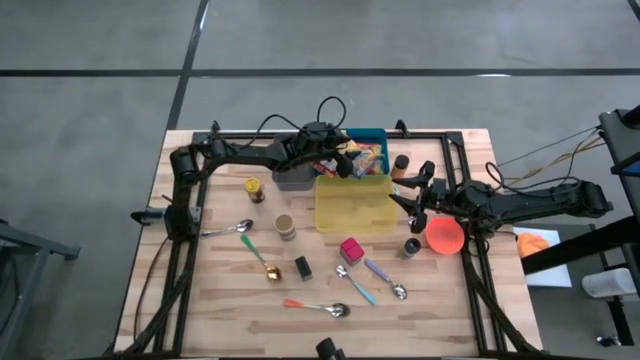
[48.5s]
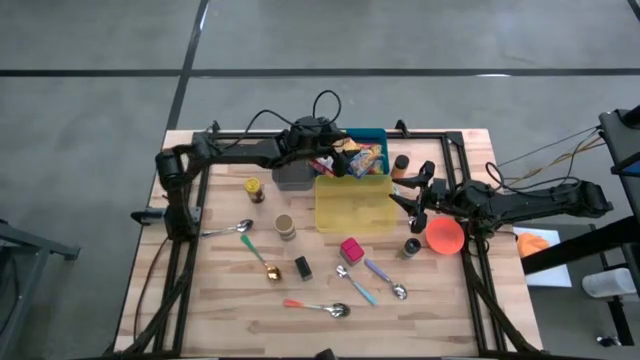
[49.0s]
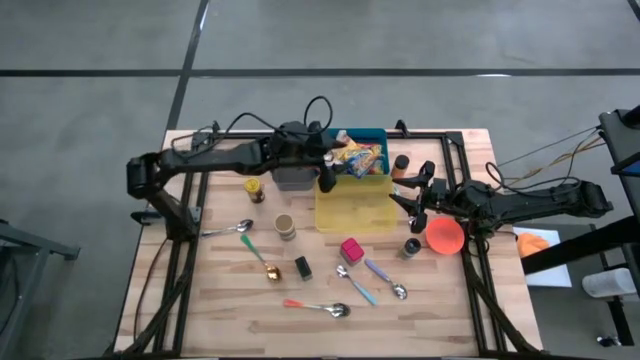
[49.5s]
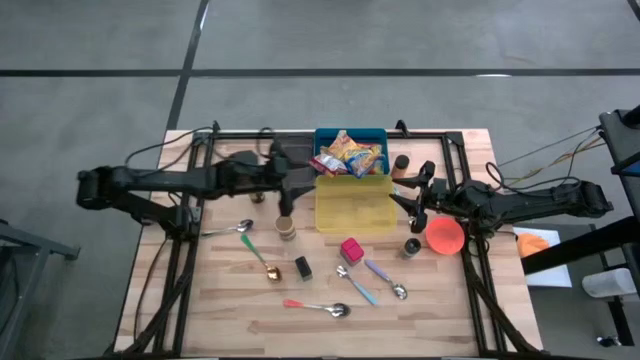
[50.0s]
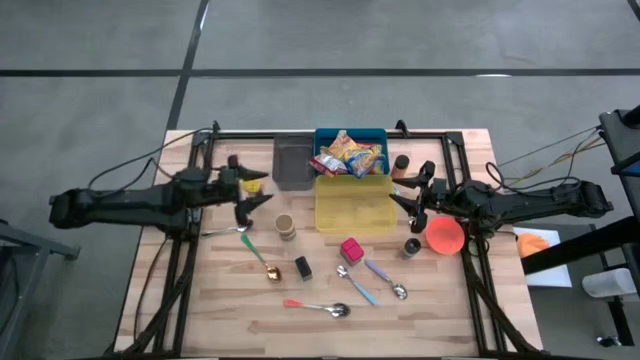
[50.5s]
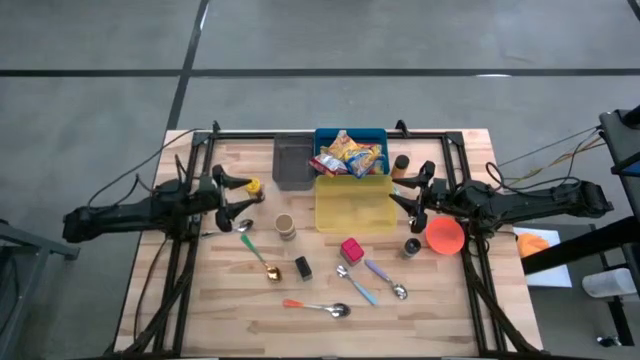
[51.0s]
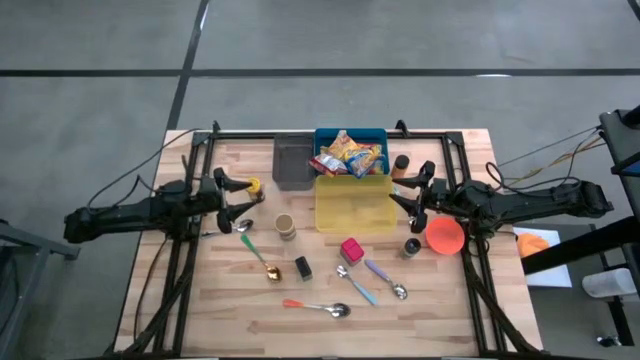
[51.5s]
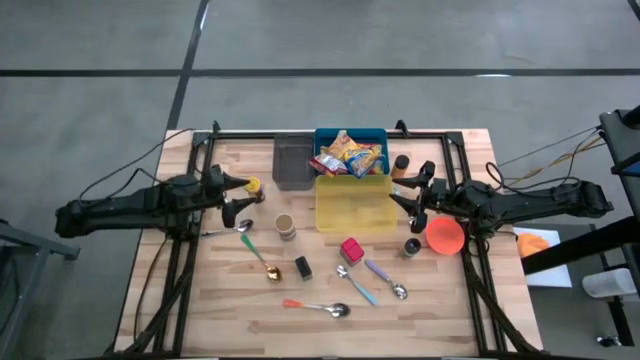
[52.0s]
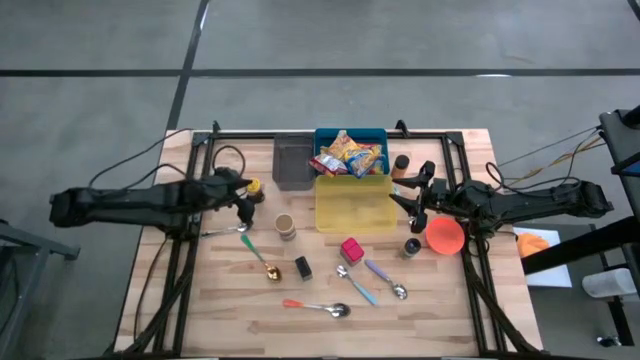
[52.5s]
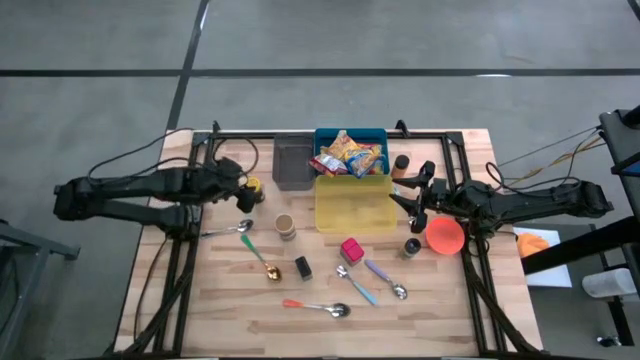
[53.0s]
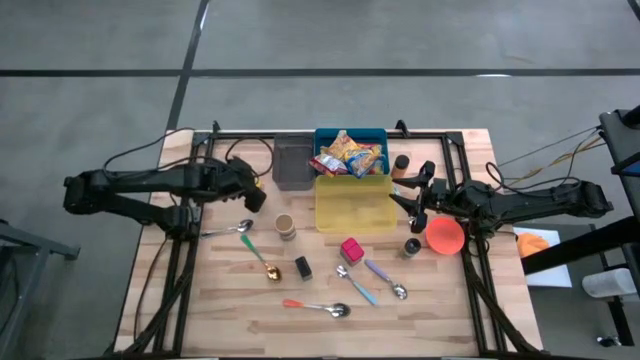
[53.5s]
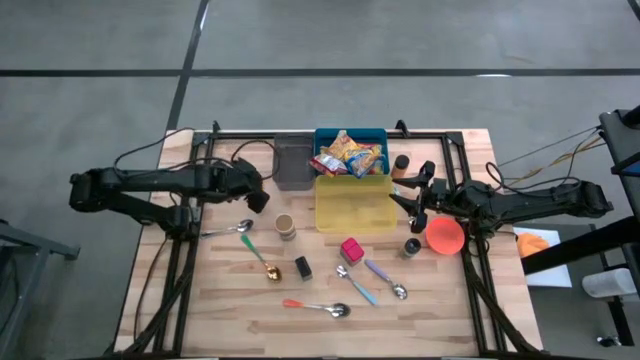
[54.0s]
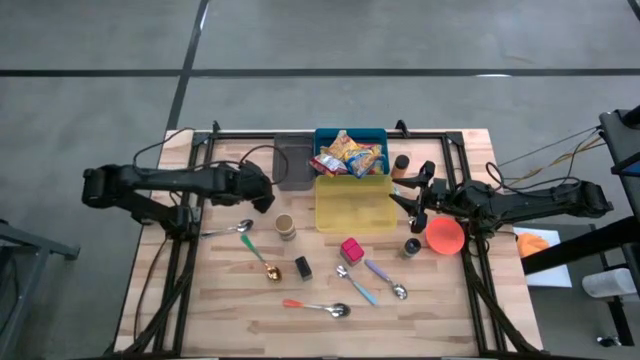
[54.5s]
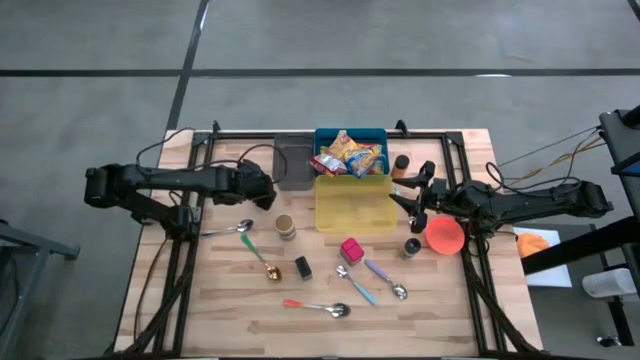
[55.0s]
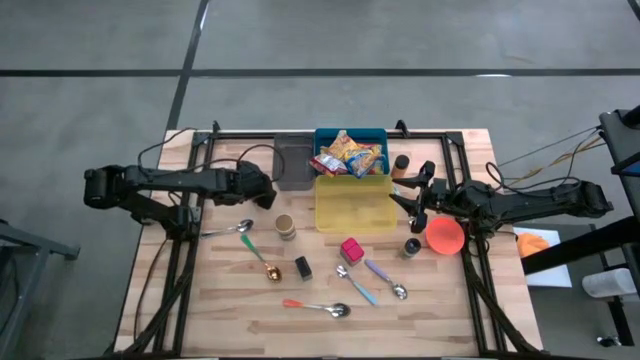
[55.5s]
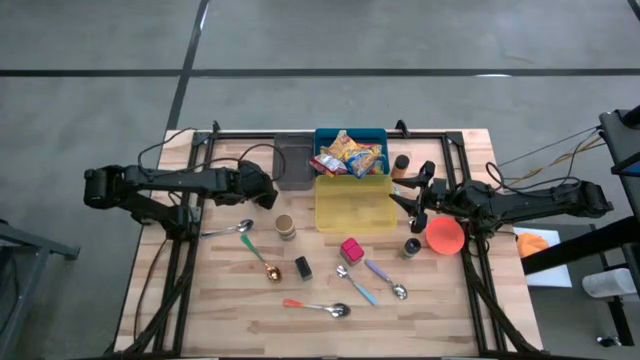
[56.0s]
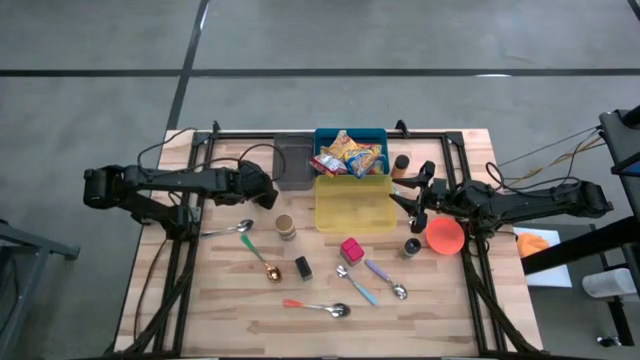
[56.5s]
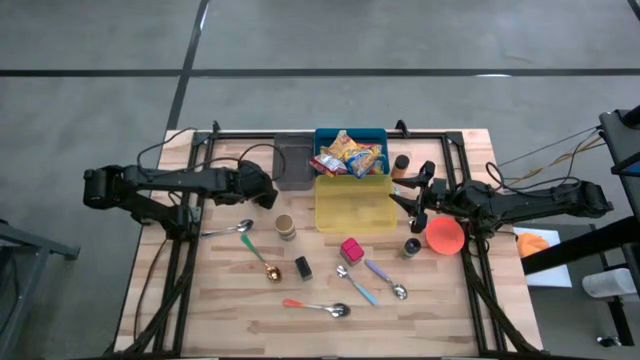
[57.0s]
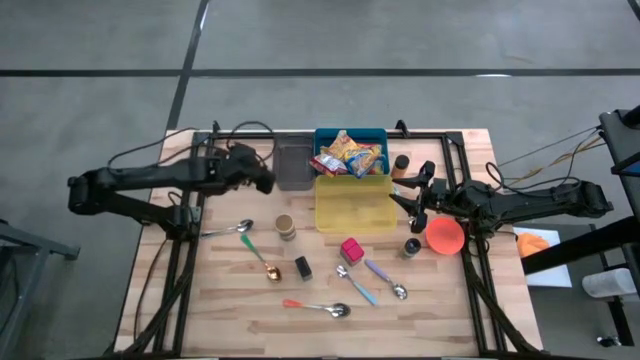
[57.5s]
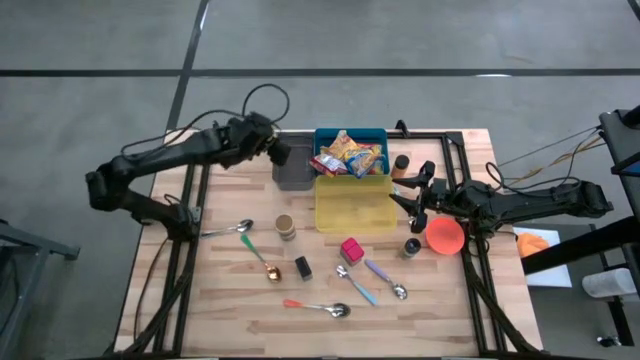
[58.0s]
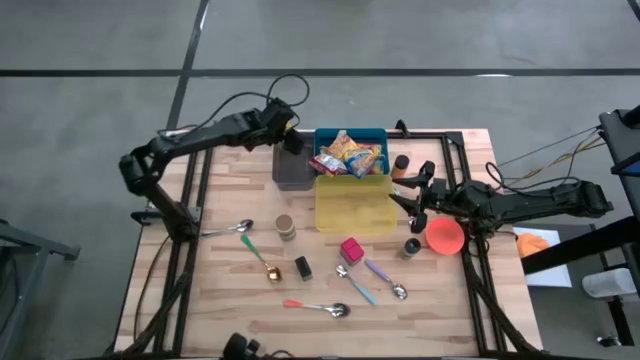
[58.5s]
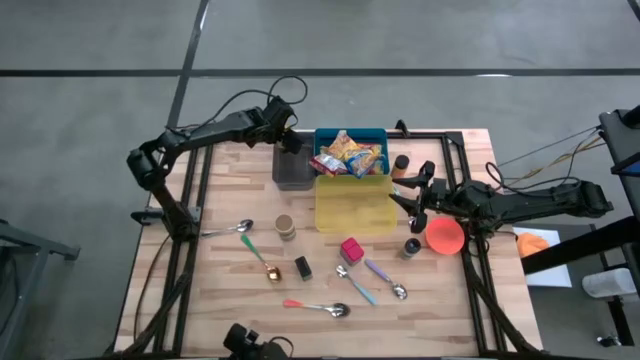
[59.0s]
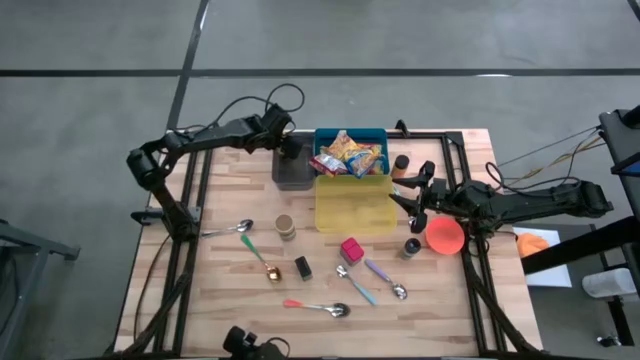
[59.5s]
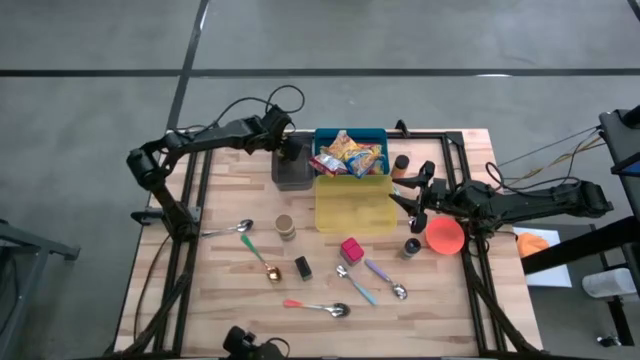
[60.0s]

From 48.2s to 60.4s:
Put the yellow spice bottle into the black bin

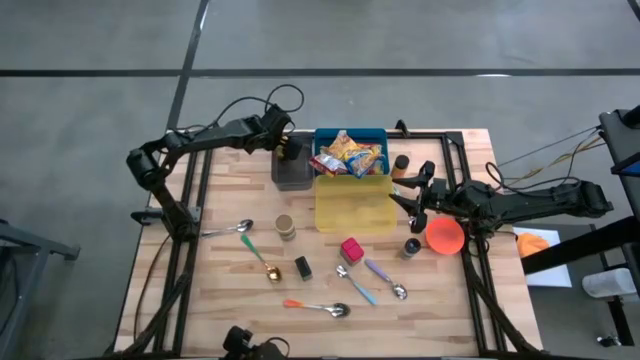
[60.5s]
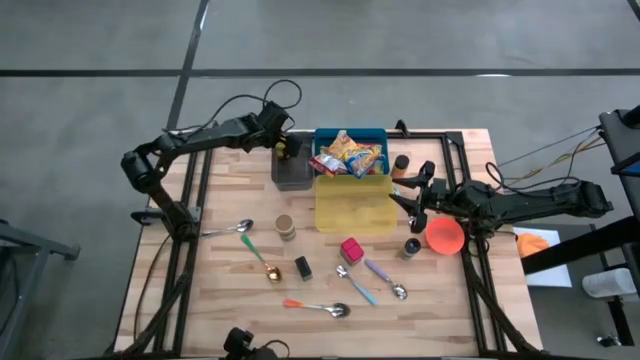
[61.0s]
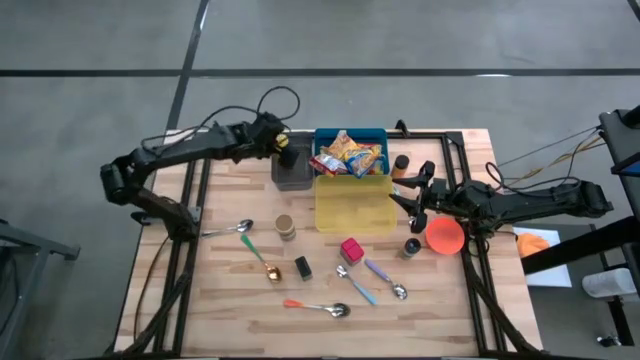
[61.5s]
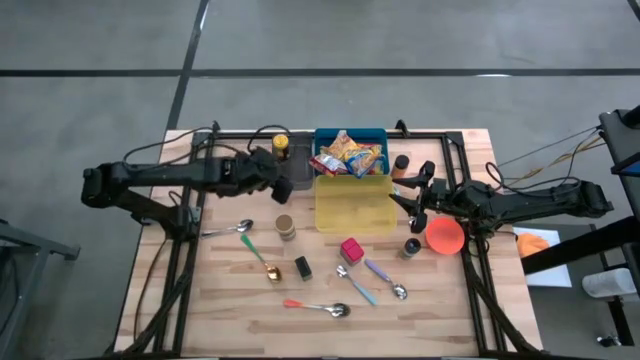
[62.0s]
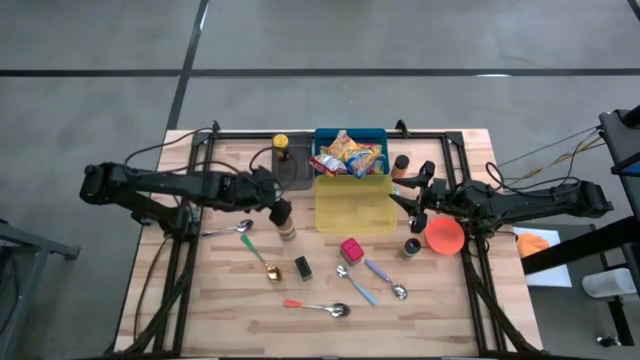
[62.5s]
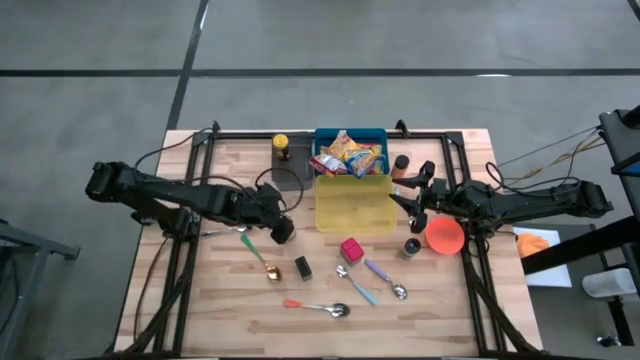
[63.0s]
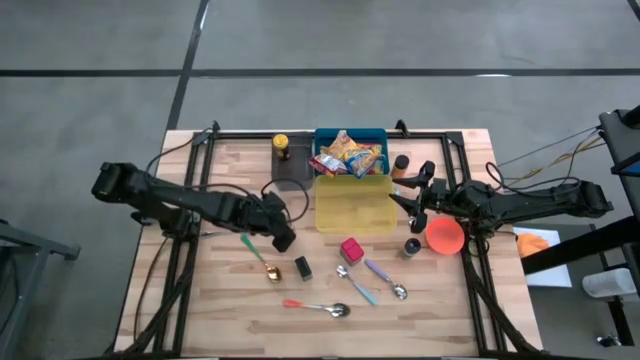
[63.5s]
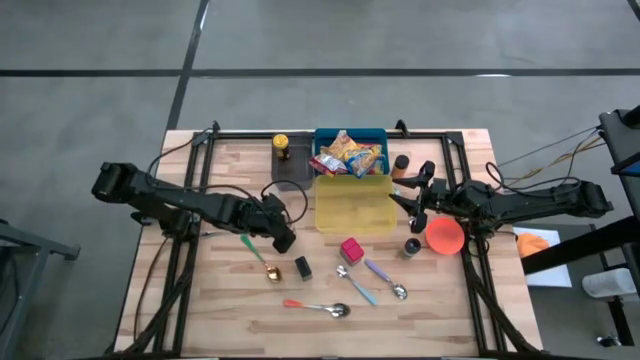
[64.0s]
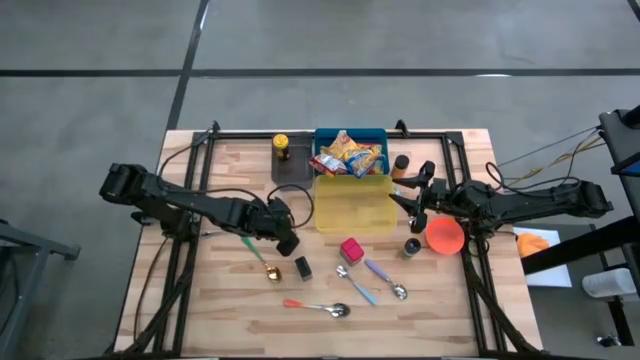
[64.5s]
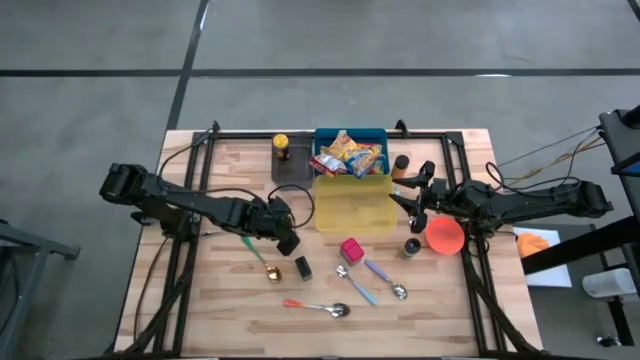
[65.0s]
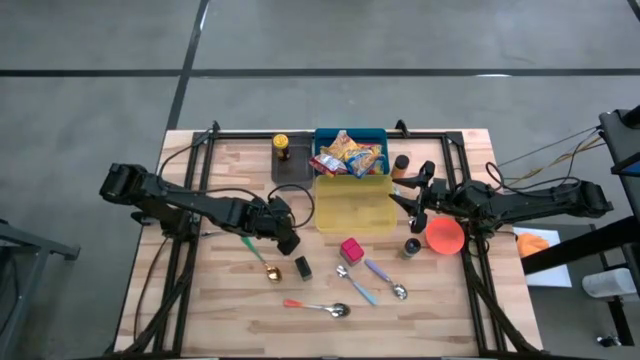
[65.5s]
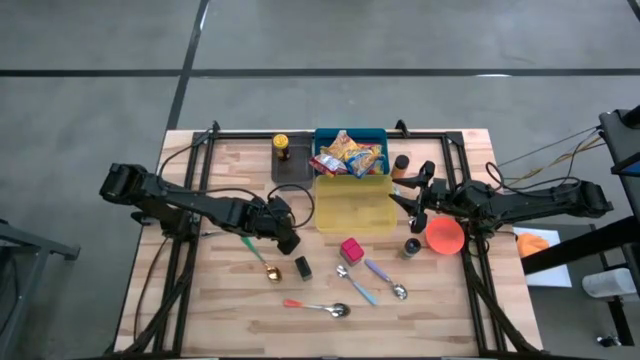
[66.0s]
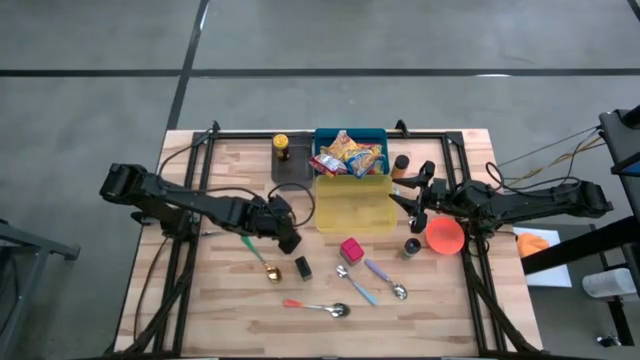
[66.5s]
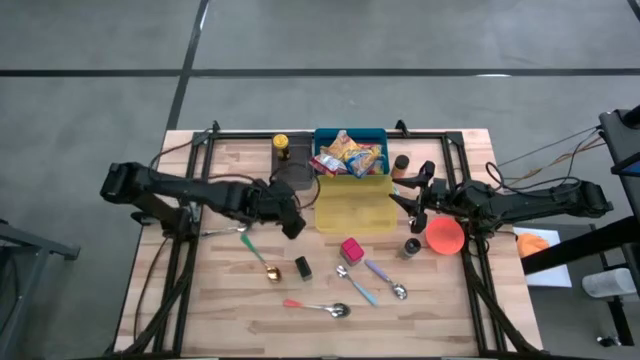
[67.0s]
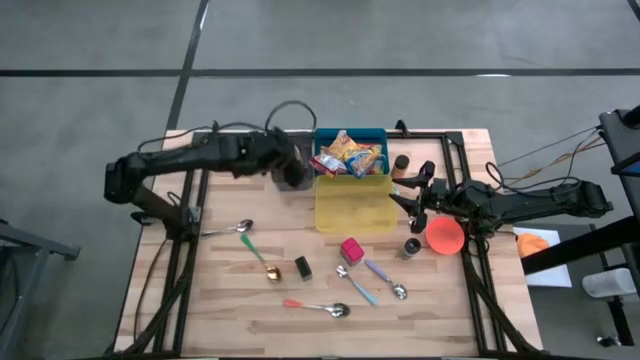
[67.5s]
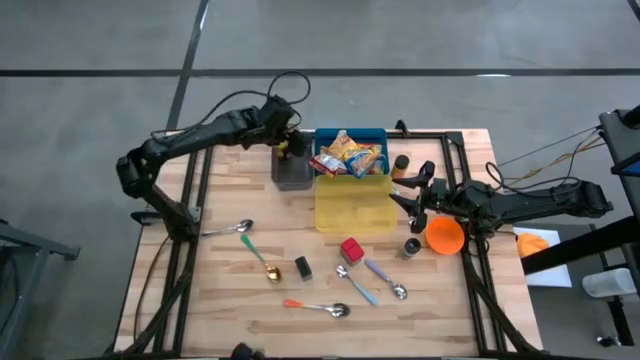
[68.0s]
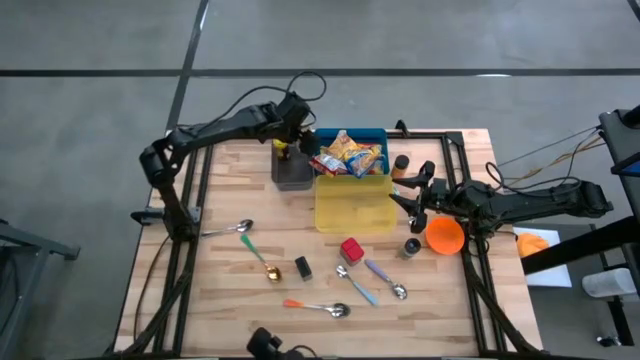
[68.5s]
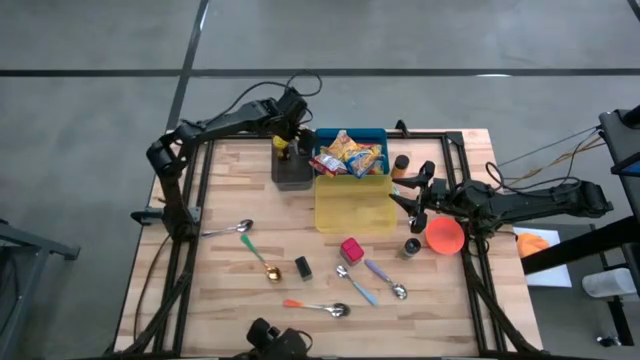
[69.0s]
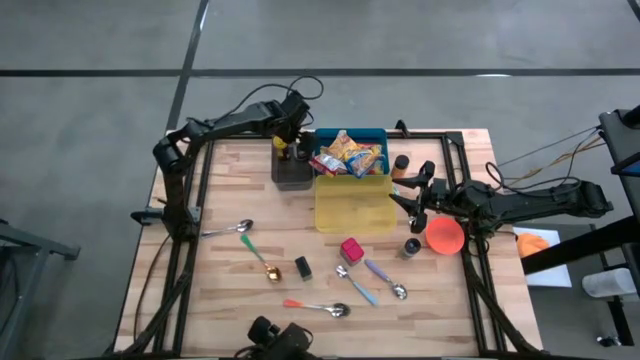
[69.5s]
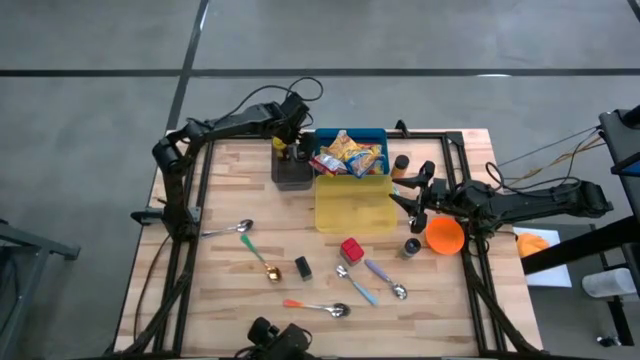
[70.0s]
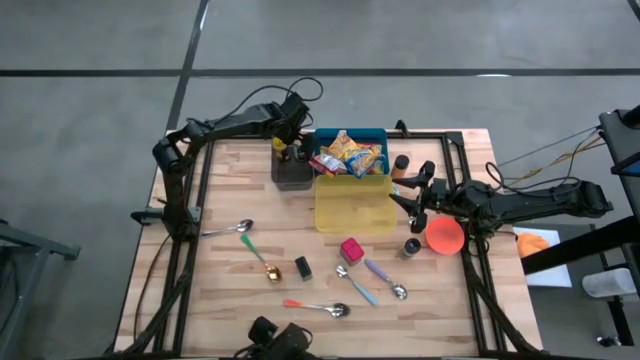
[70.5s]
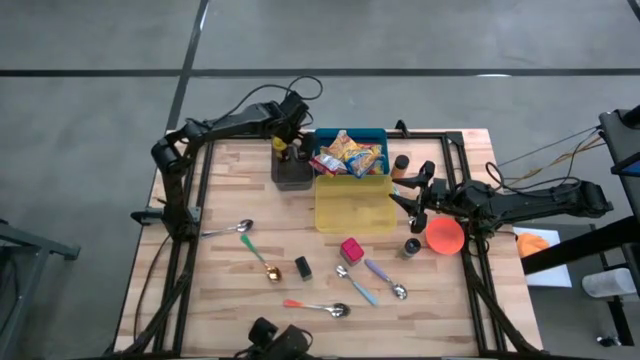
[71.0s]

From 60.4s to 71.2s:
Put the golden spice bottle into the black bin
